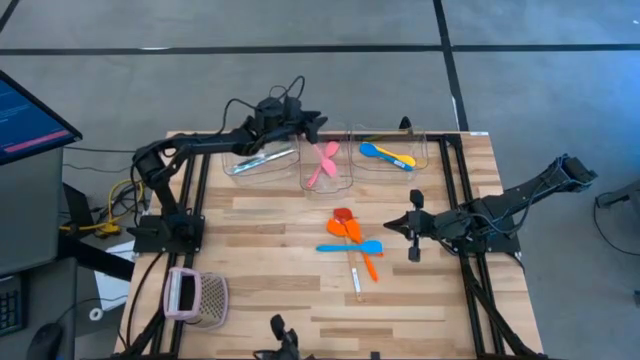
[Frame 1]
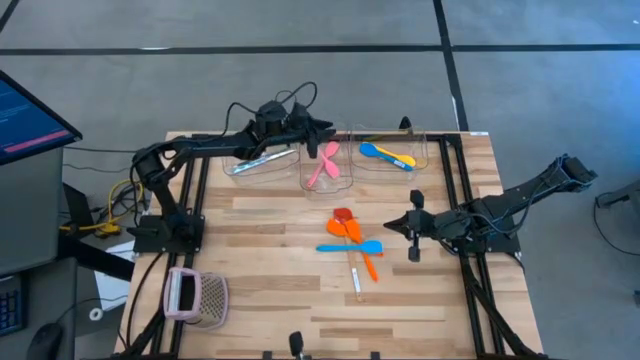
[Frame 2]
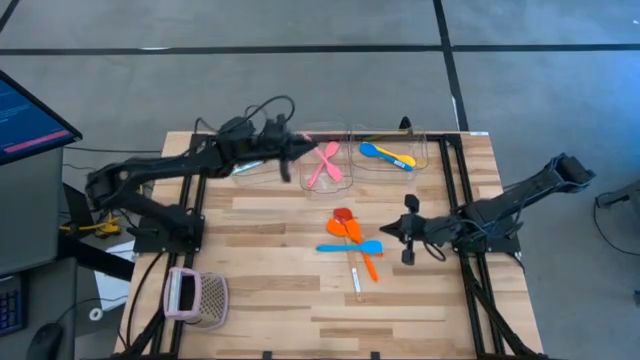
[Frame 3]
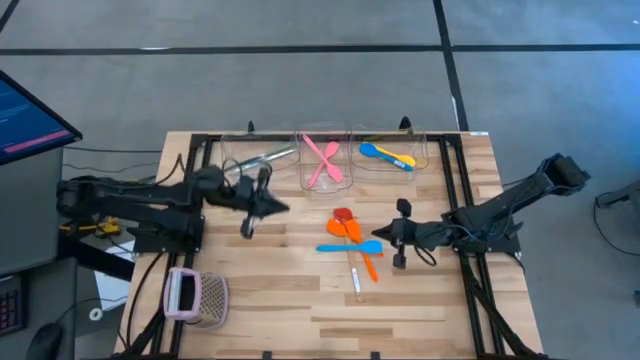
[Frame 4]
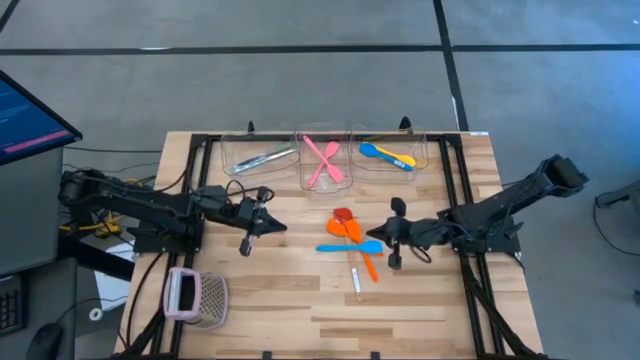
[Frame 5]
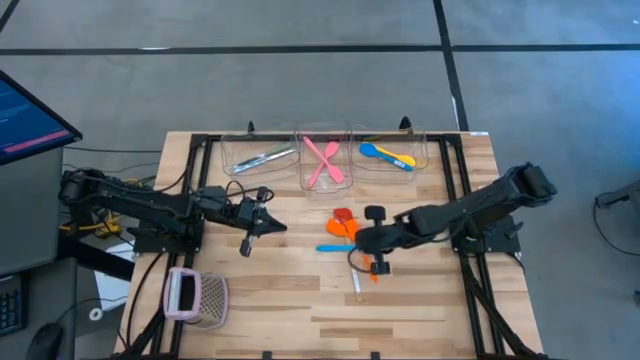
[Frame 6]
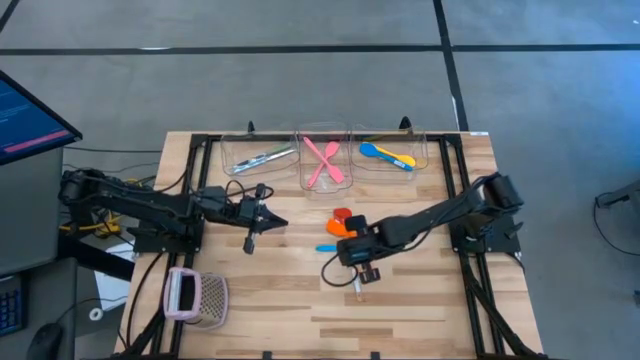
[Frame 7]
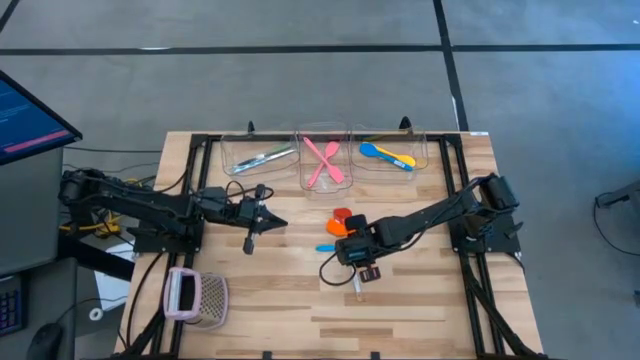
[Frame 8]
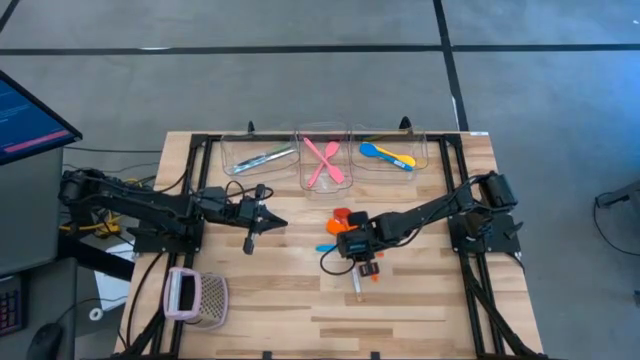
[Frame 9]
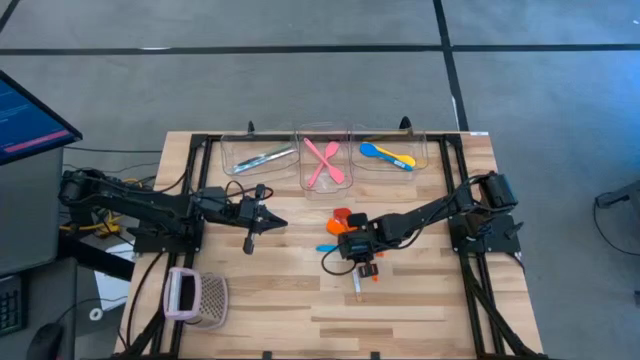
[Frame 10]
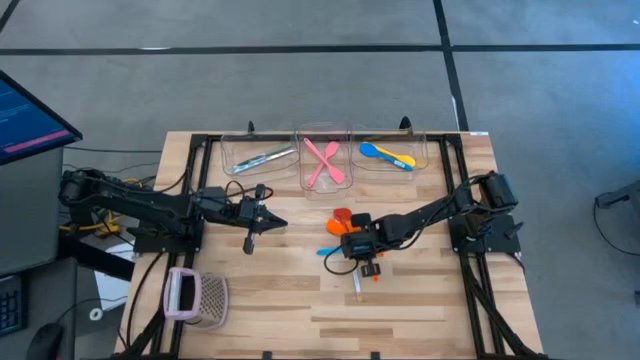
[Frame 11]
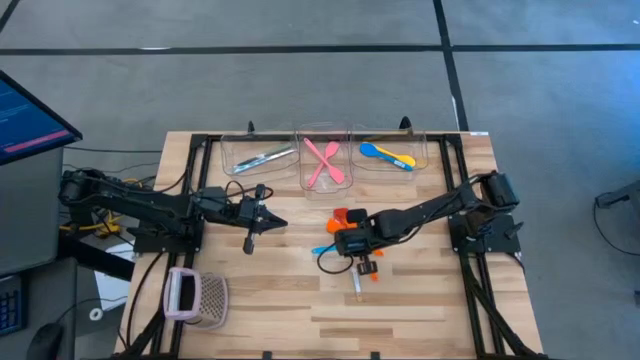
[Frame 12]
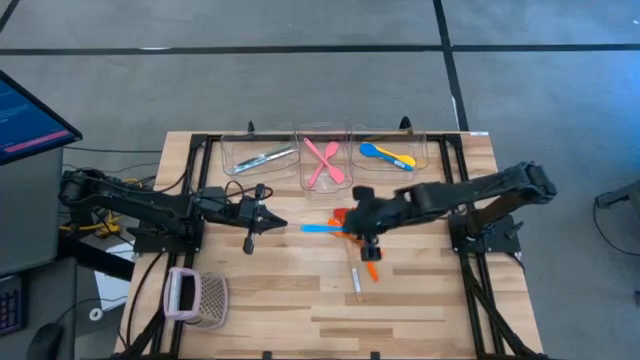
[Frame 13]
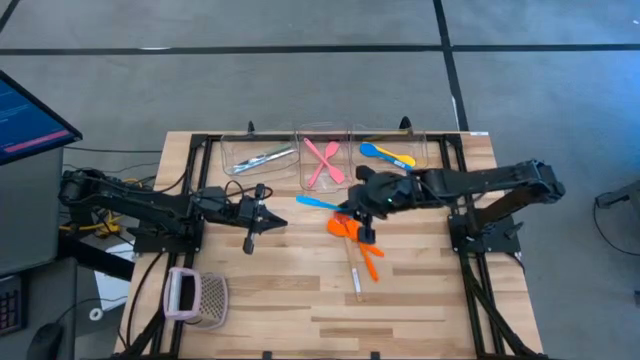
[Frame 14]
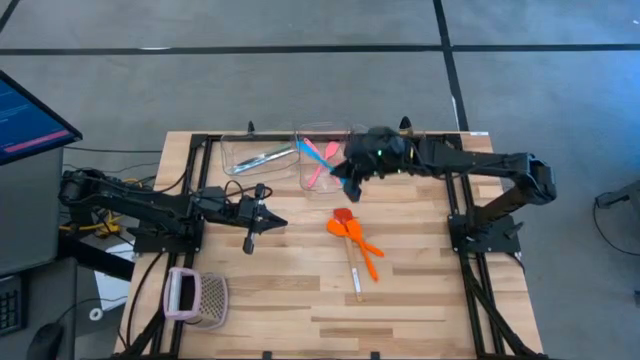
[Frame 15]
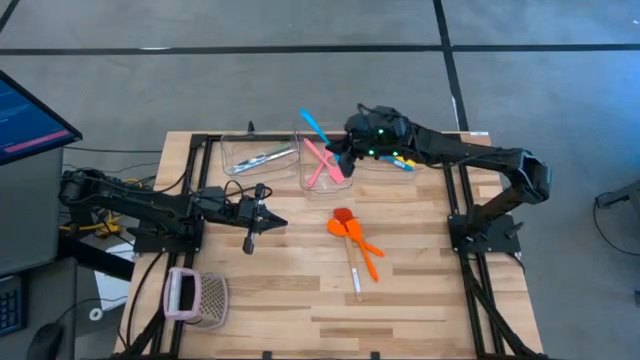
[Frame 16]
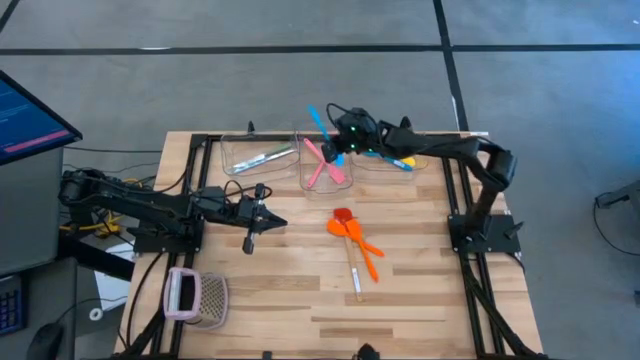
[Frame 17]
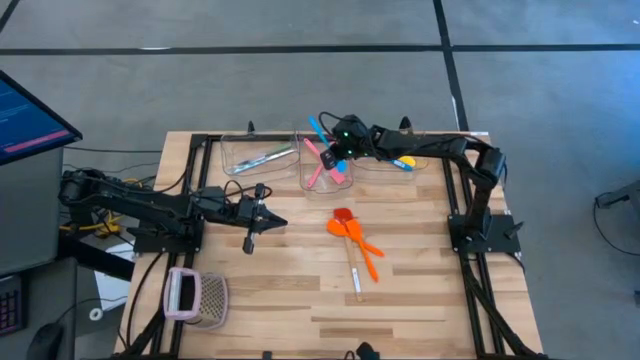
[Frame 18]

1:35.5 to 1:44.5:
Task: Pick & Place Kitchen Items
Put the blue spatula into the middle transparent bin

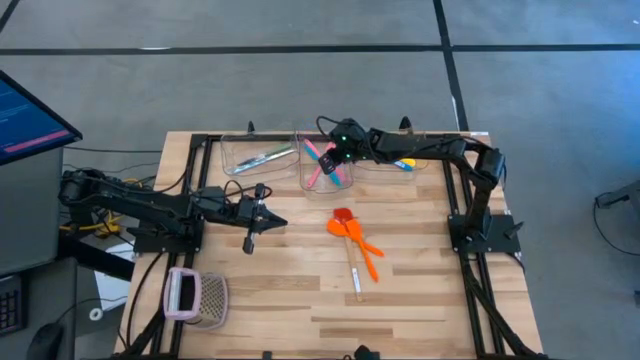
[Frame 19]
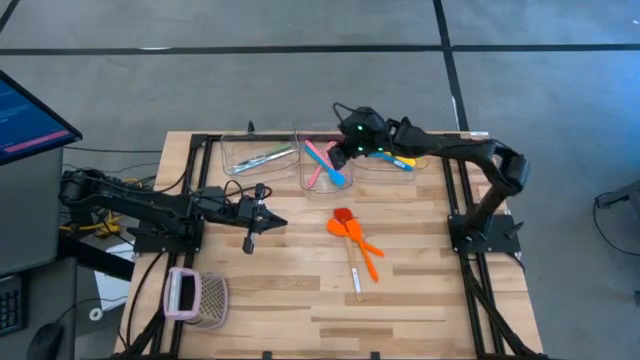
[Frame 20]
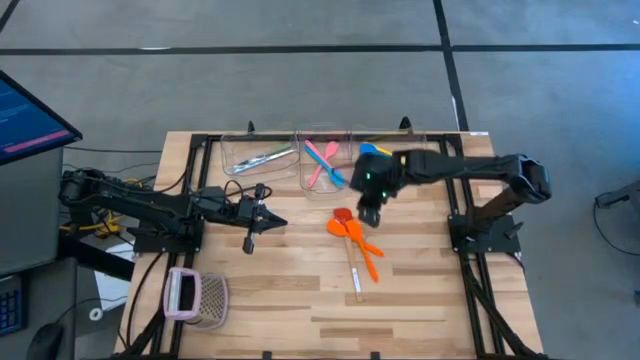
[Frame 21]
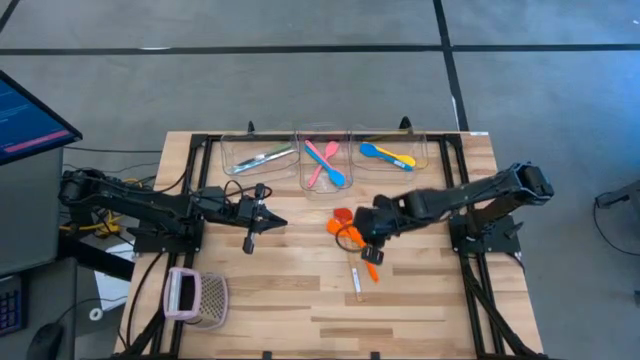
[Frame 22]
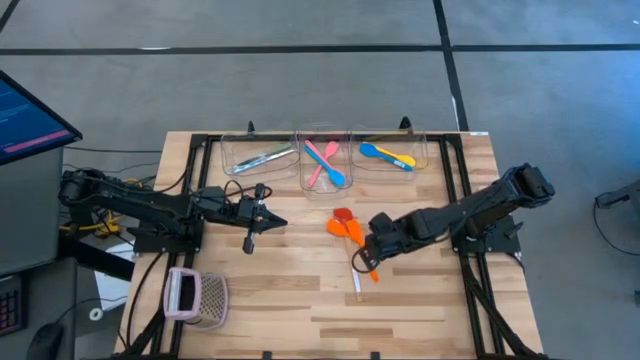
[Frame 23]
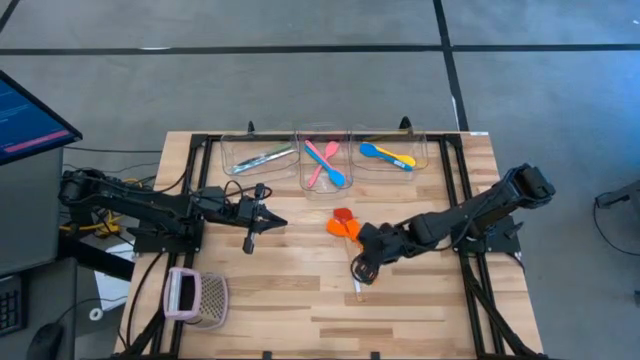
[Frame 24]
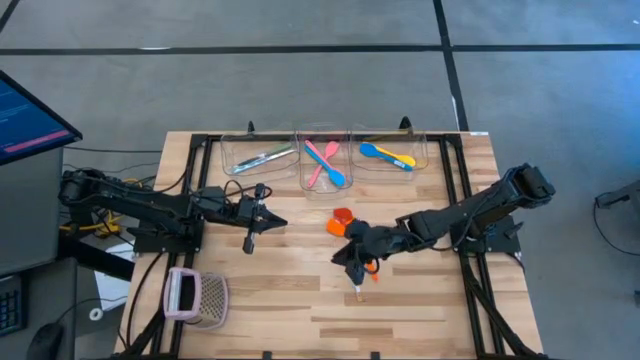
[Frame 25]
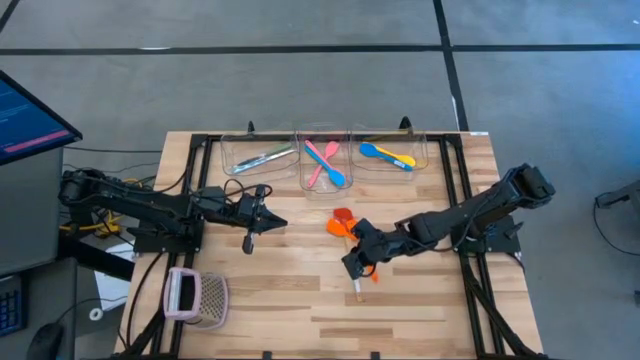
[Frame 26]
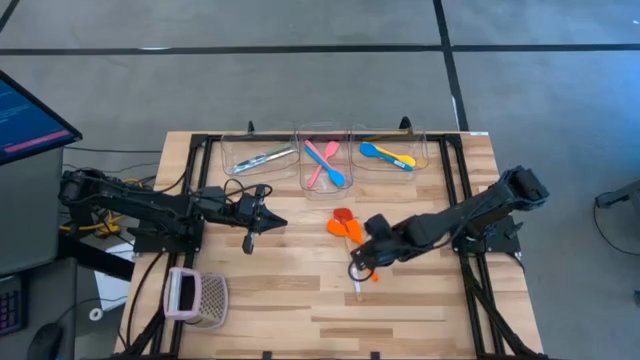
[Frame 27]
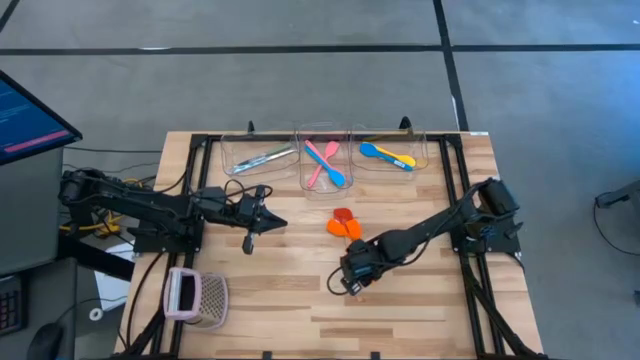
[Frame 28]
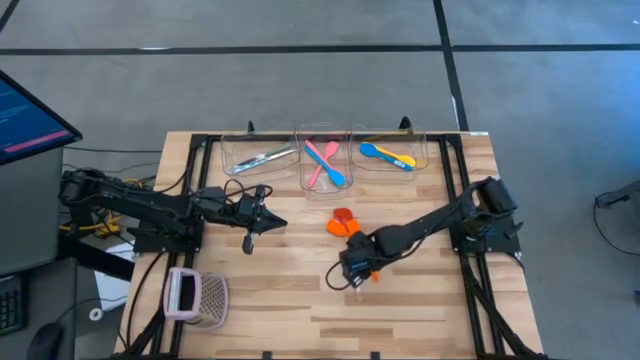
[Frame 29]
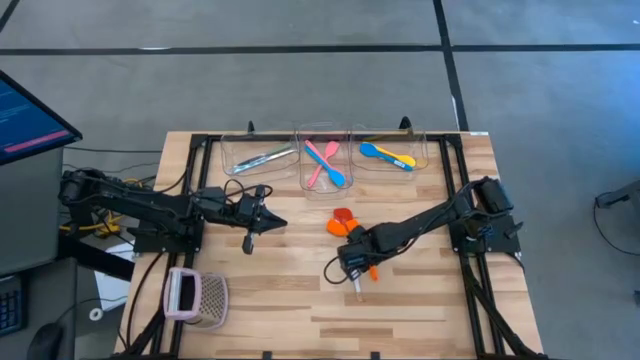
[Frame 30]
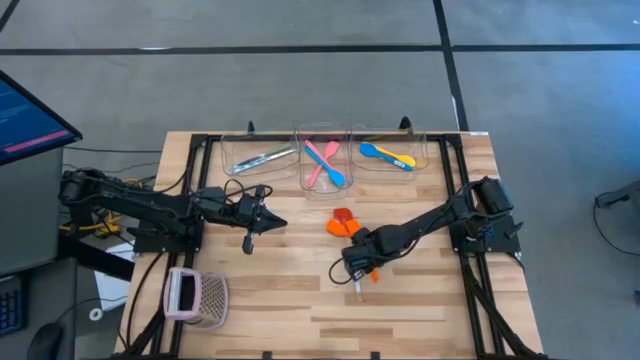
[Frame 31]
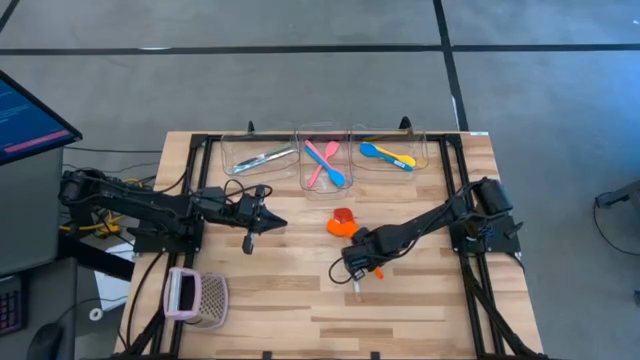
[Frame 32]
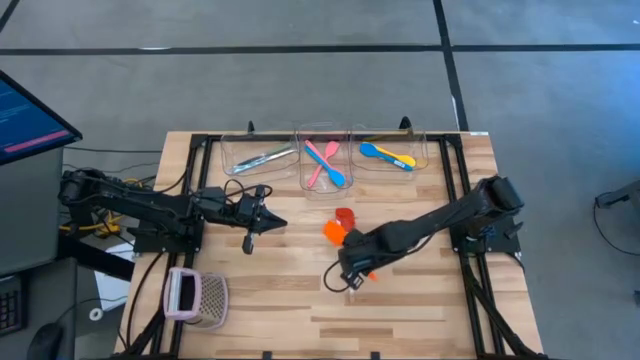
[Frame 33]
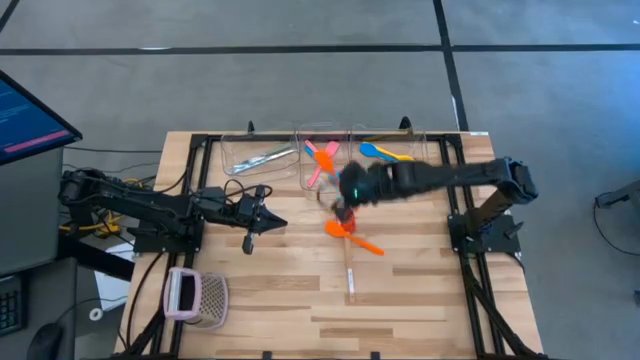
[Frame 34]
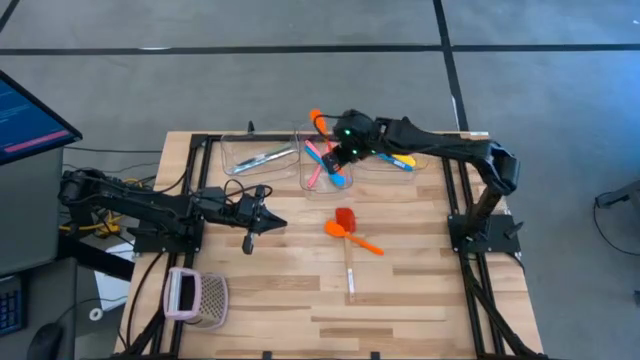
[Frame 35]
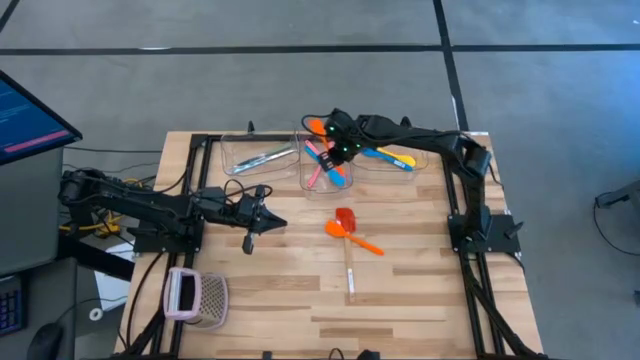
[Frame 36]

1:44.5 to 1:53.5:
Put the orange spatula into the middle transparent bin

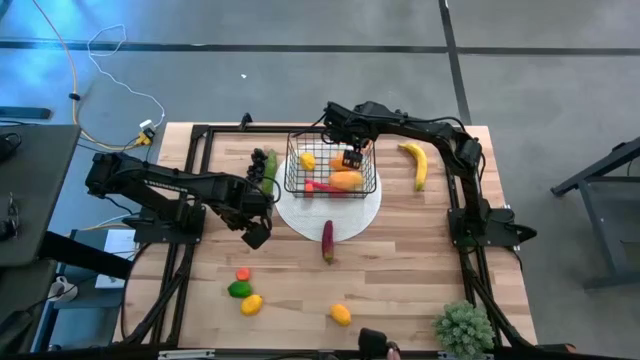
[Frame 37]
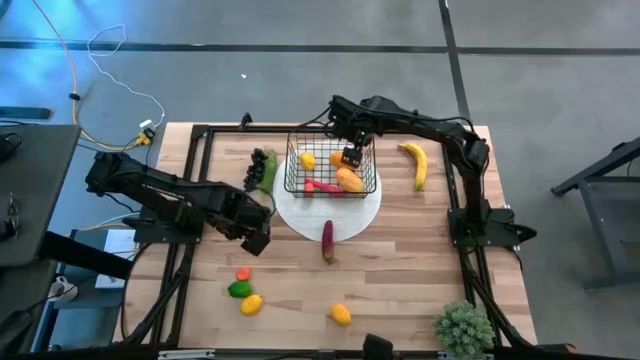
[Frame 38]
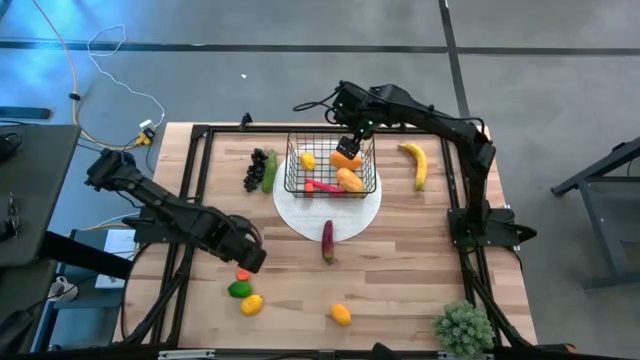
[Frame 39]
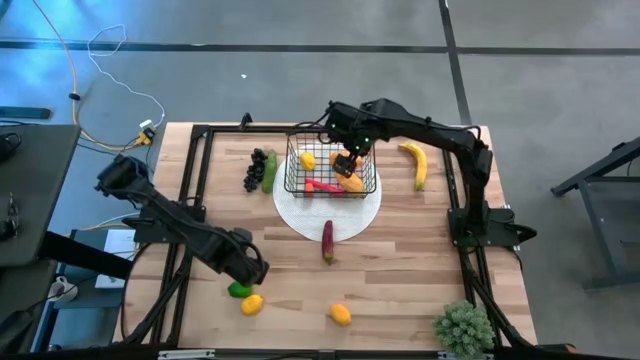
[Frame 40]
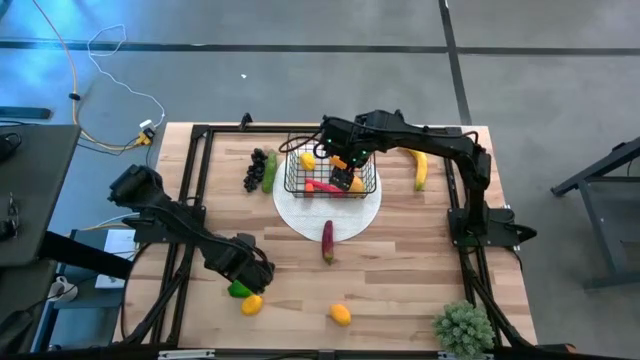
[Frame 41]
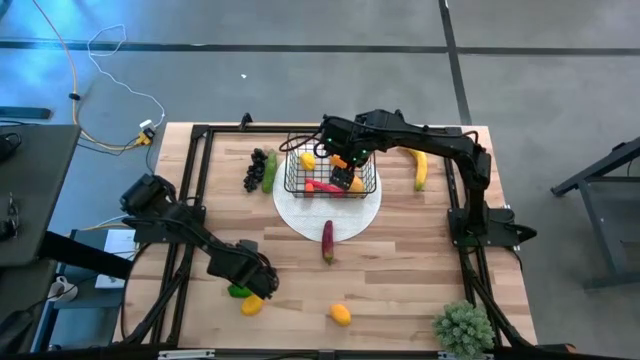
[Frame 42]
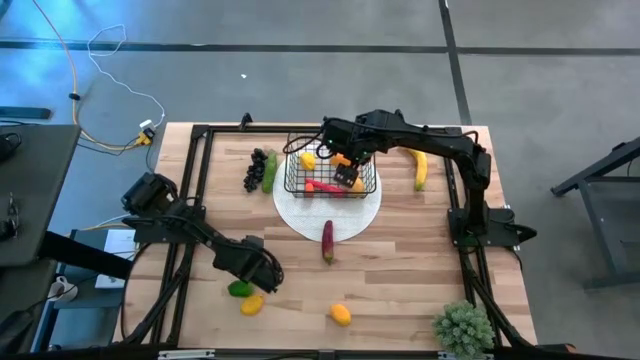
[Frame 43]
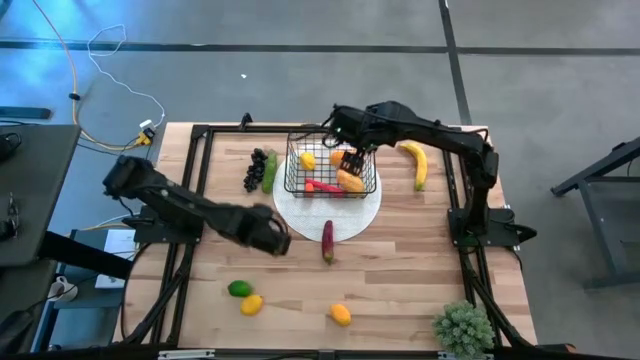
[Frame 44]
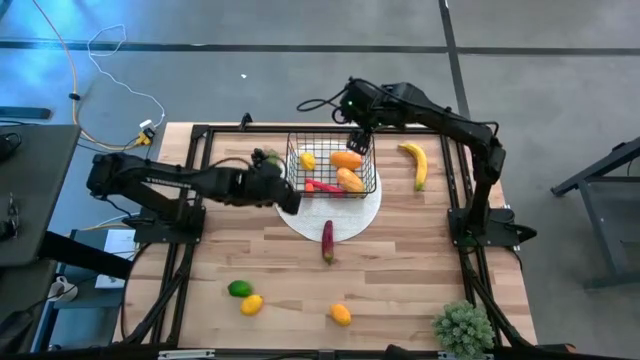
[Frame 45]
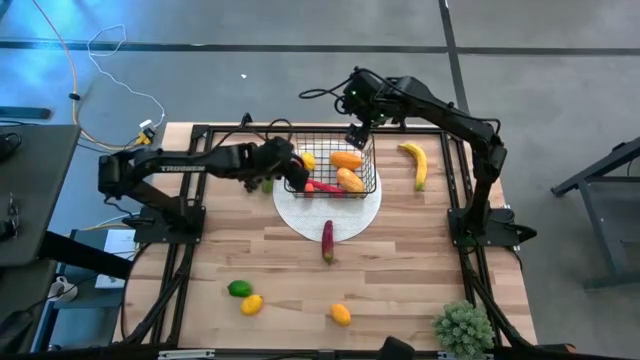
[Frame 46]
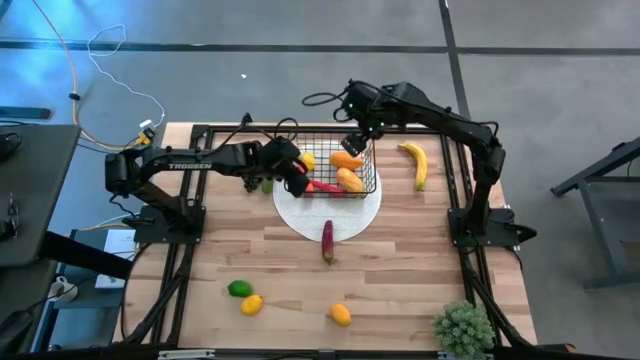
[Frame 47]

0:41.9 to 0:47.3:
Task: Build produce basket
Put the orange into the wire basket
